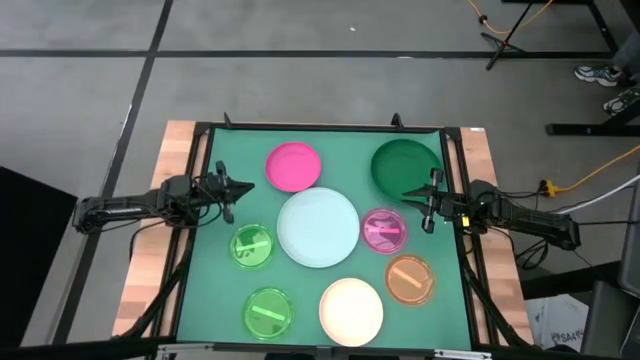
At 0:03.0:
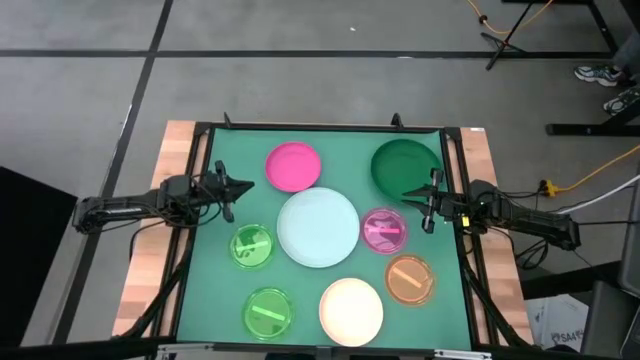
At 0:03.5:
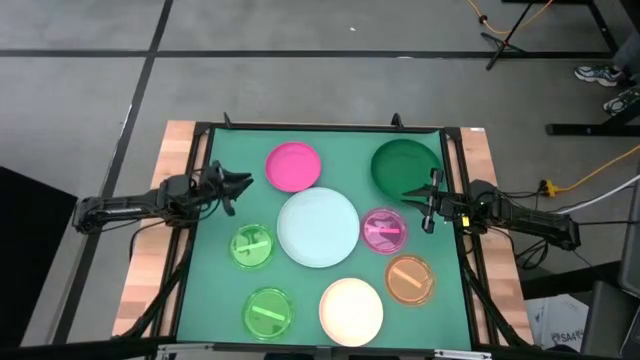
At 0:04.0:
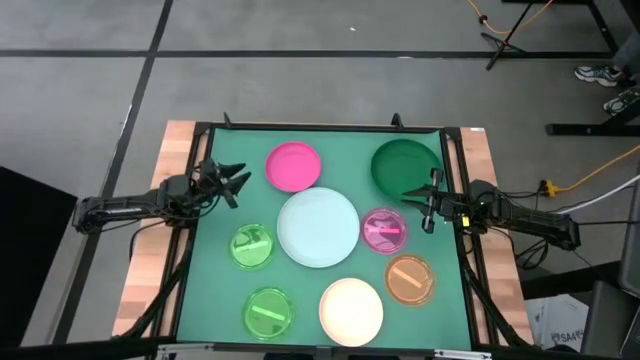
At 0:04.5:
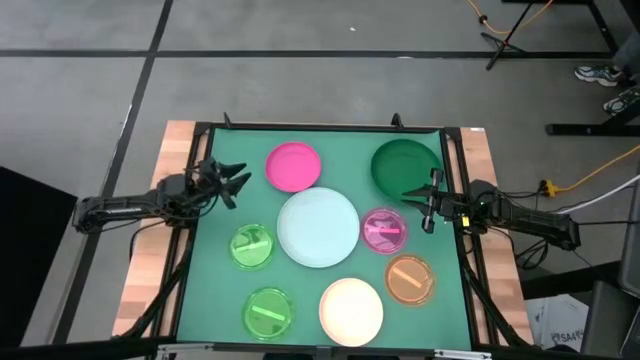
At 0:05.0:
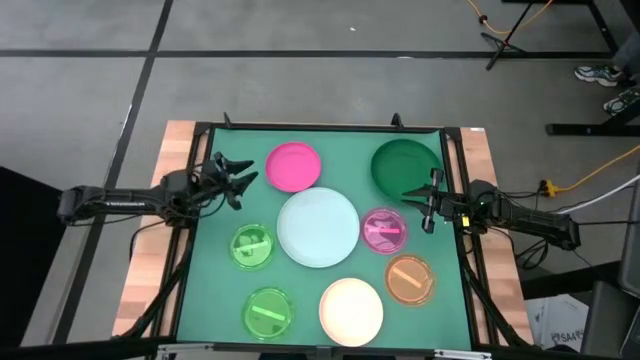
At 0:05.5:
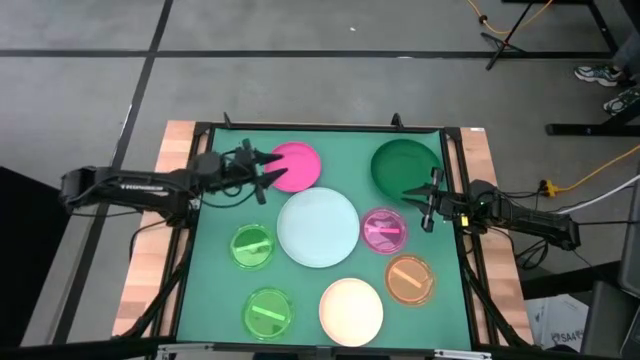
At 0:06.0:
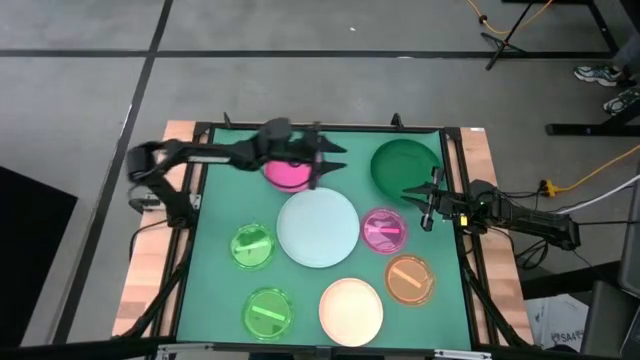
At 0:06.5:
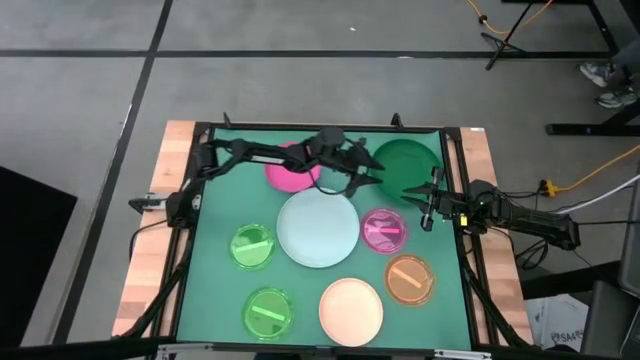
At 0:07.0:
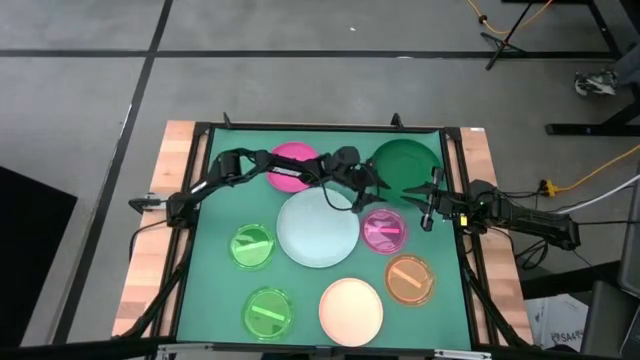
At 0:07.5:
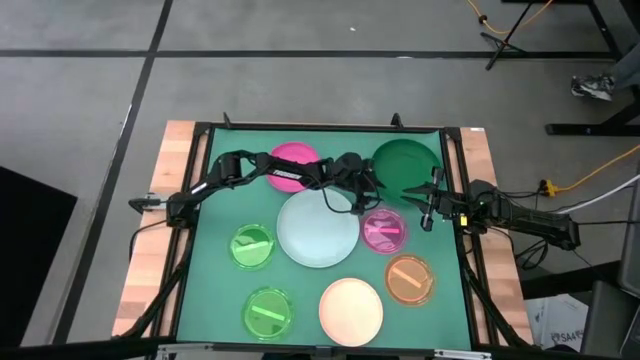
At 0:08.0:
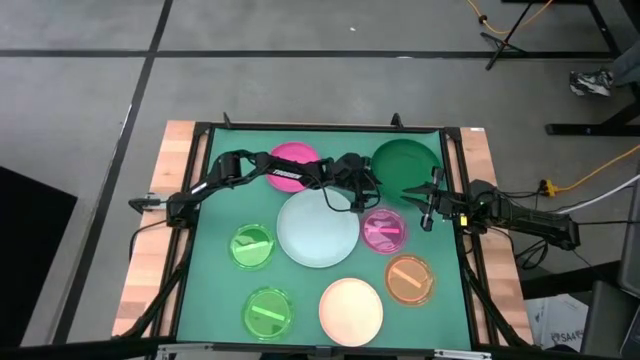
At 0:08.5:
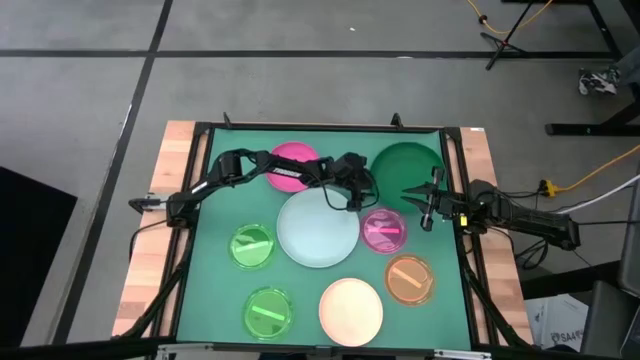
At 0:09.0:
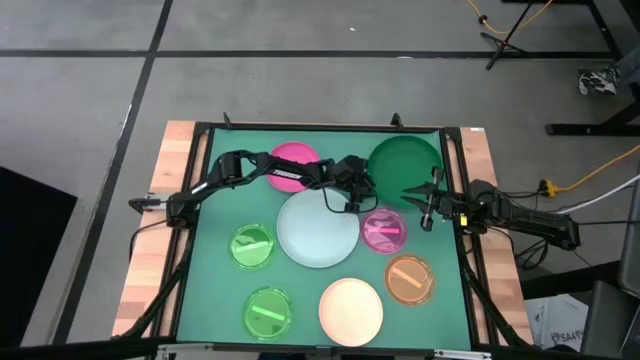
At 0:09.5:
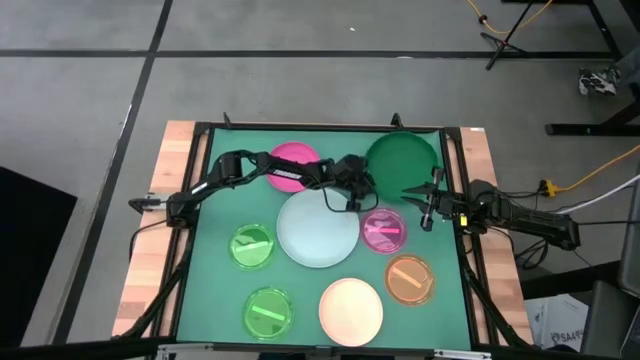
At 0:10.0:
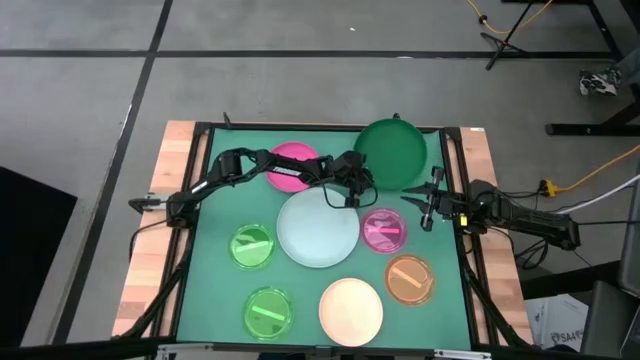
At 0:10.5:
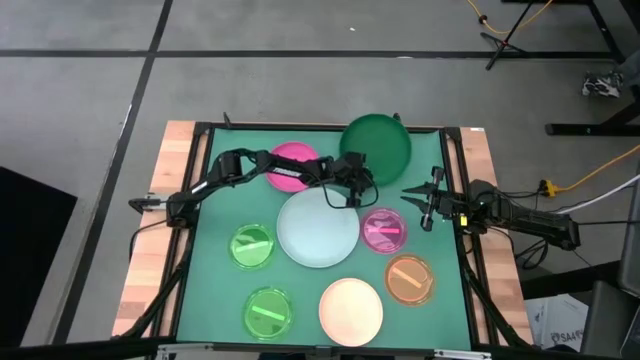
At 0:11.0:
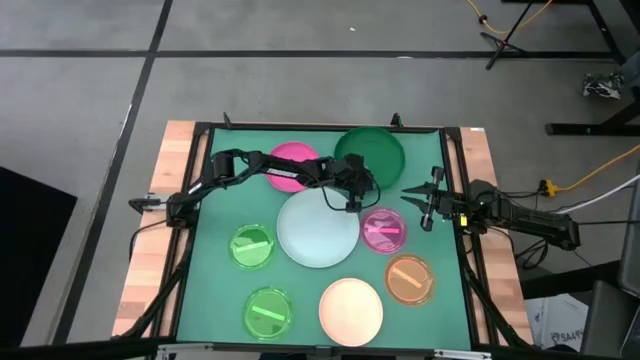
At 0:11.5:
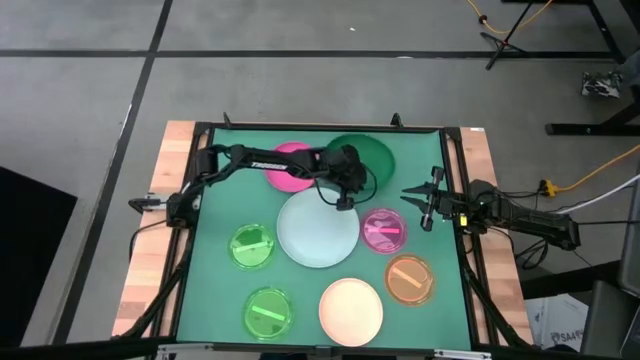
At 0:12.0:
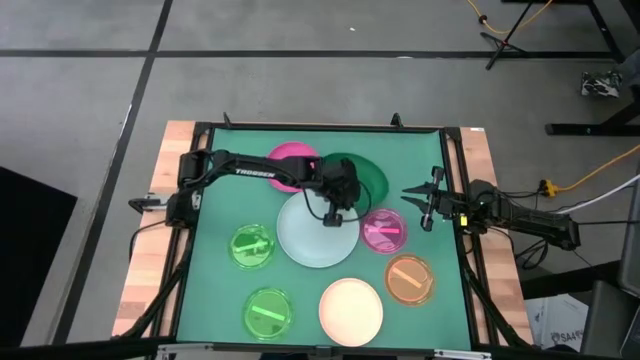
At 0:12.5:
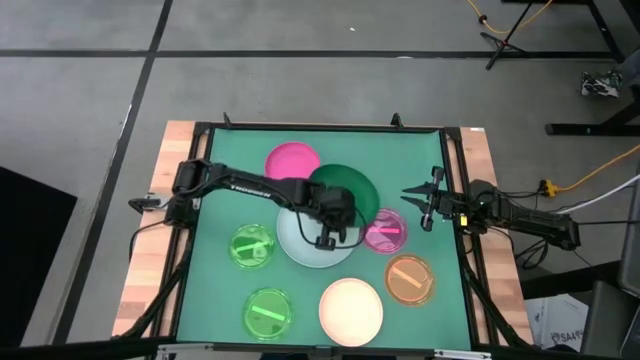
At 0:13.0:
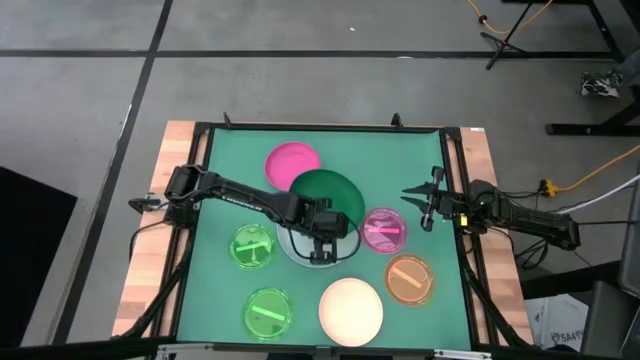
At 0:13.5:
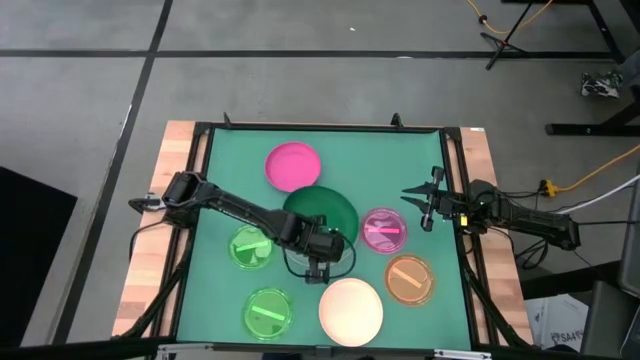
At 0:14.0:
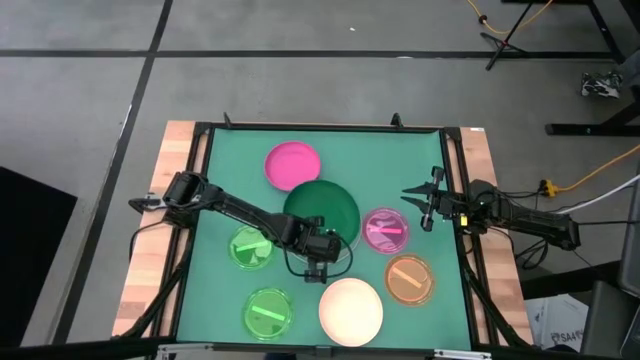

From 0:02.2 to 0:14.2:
Task: Stack plastic plates
Stack the dark green plate on top of the light blue plate

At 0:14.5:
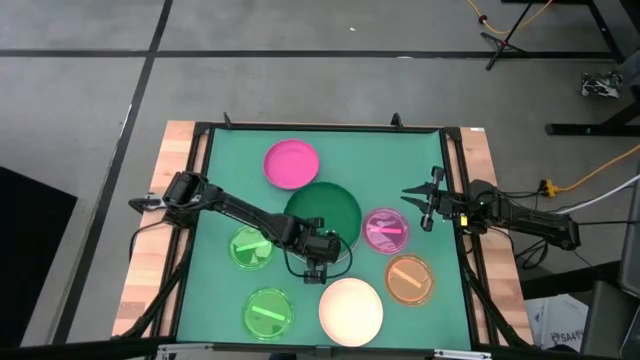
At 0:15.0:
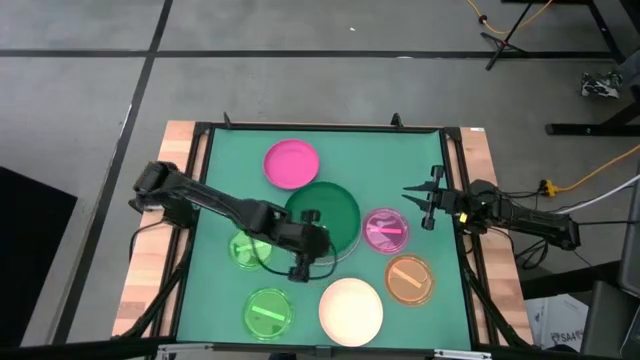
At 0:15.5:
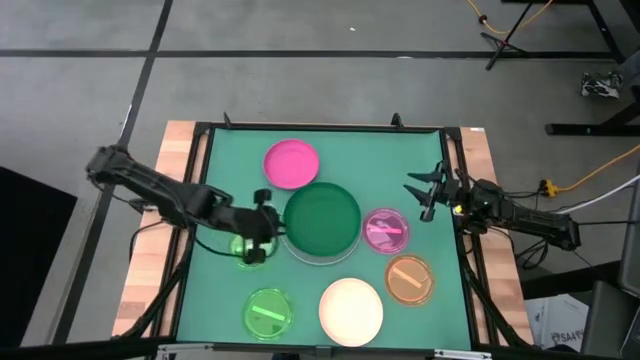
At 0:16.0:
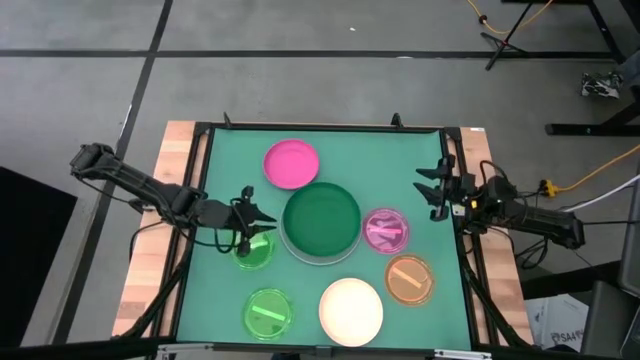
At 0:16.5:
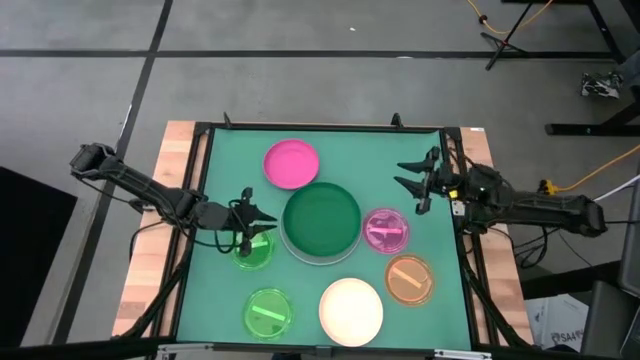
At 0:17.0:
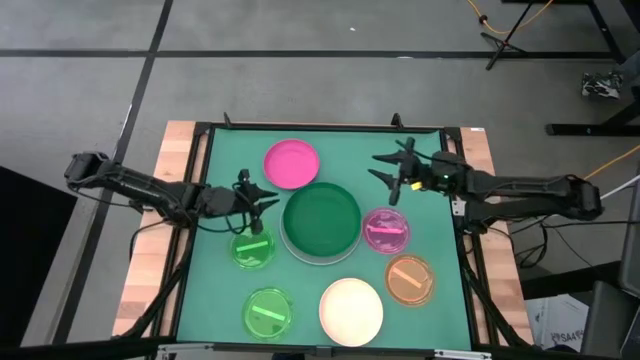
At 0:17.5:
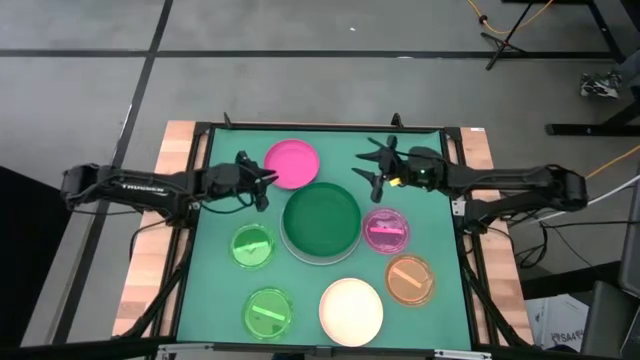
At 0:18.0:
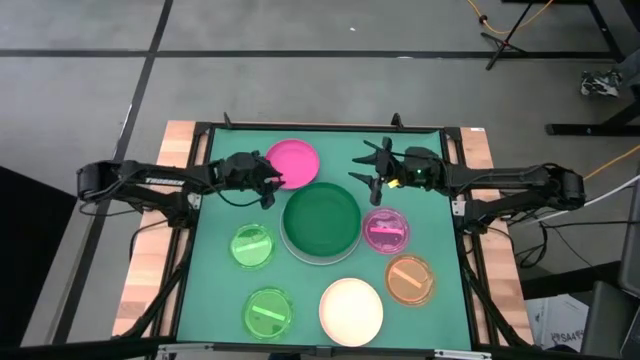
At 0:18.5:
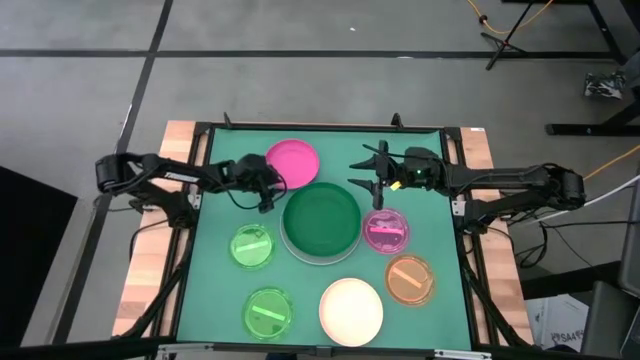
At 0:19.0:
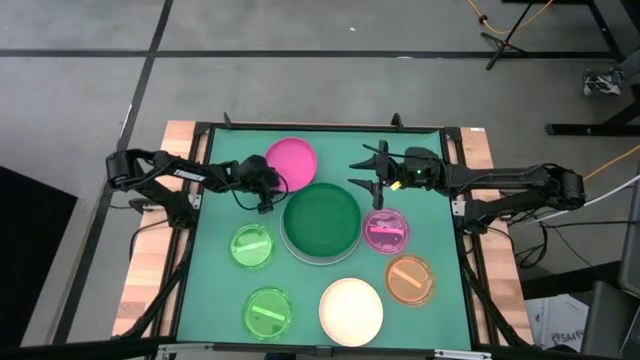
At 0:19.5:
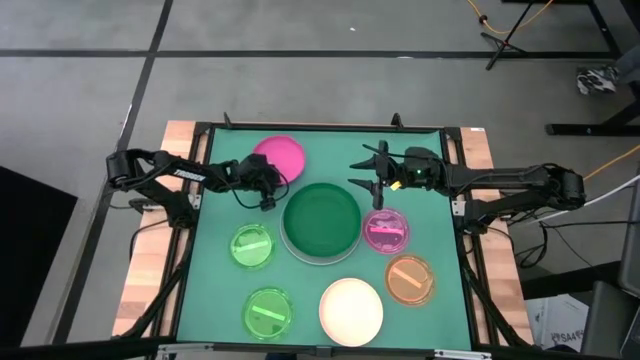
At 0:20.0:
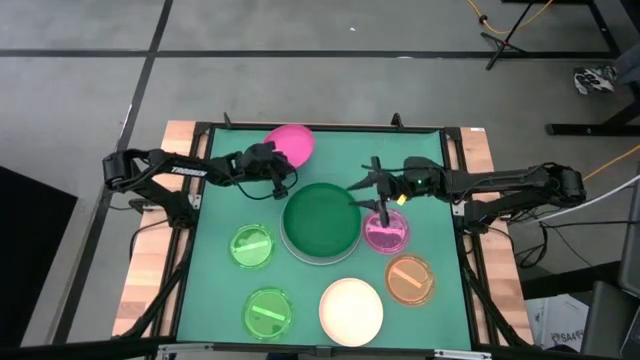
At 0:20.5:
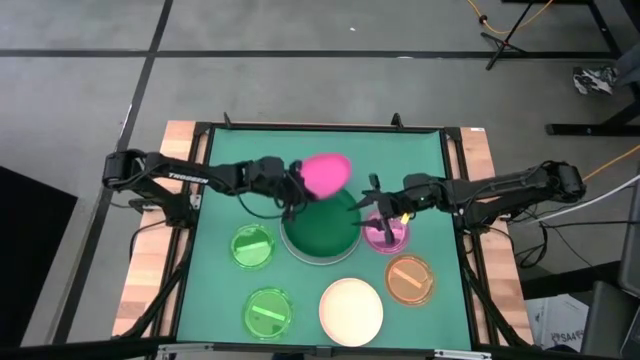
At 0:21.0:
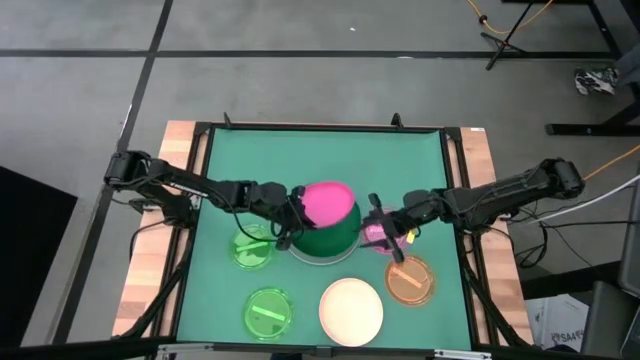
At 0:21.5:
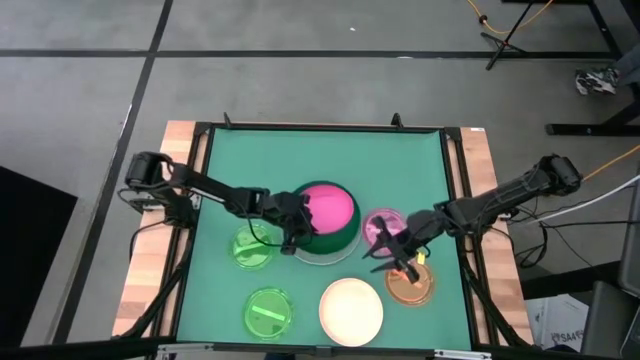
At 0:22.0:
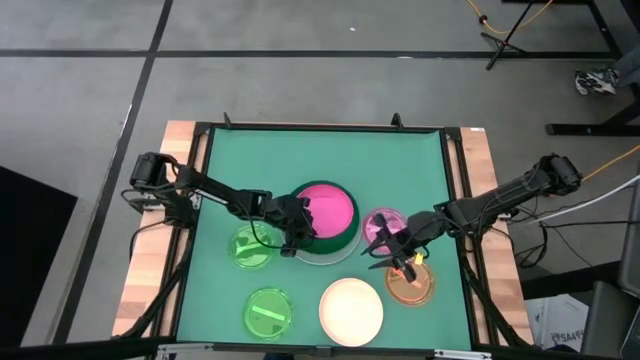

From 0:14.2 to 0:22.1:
Stack the pink plate on top of the dark green plate
